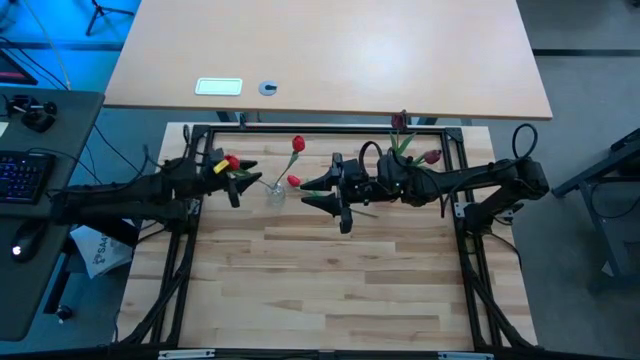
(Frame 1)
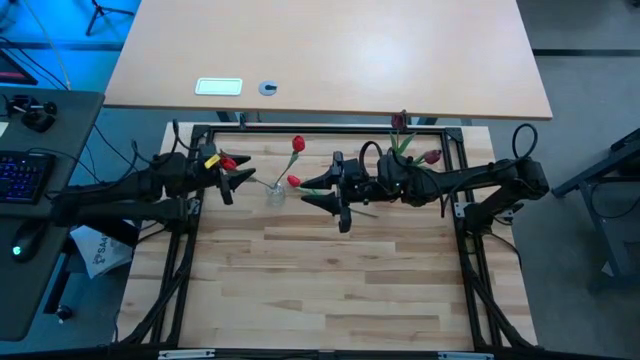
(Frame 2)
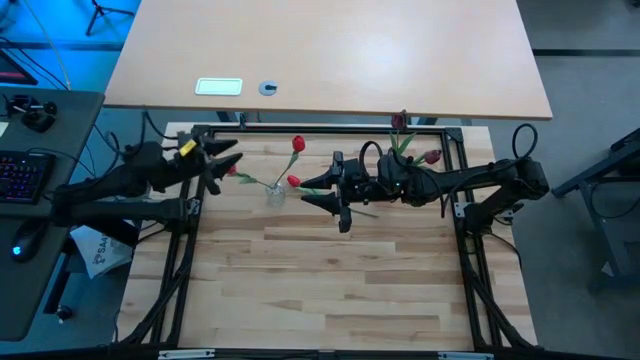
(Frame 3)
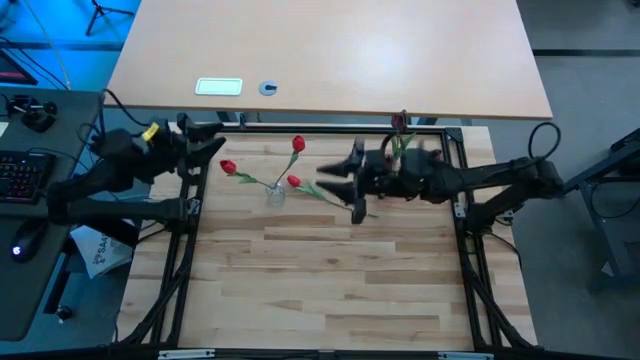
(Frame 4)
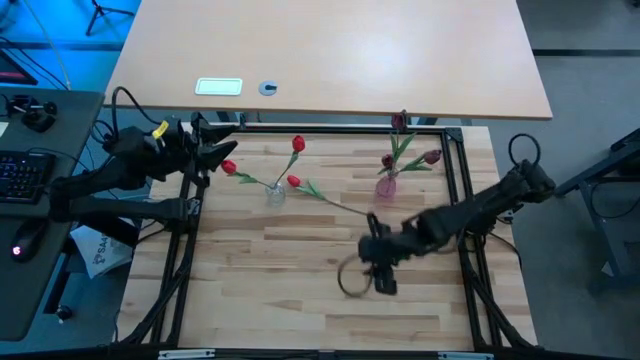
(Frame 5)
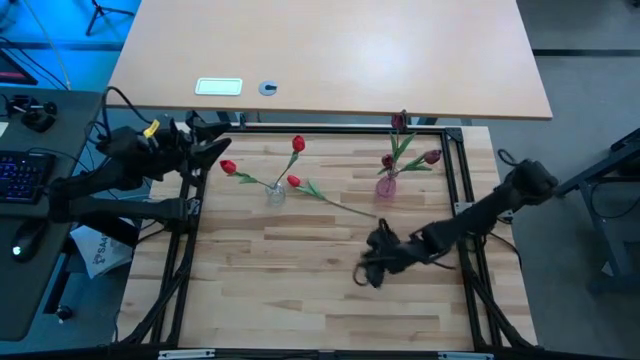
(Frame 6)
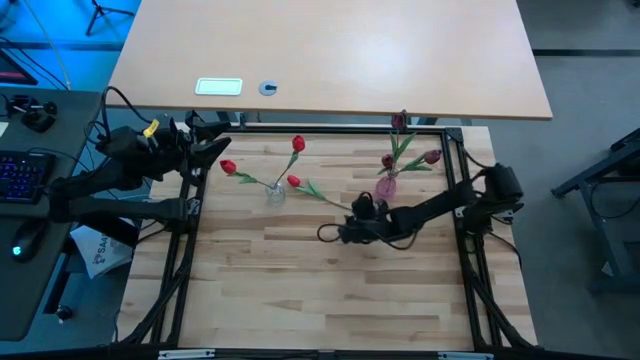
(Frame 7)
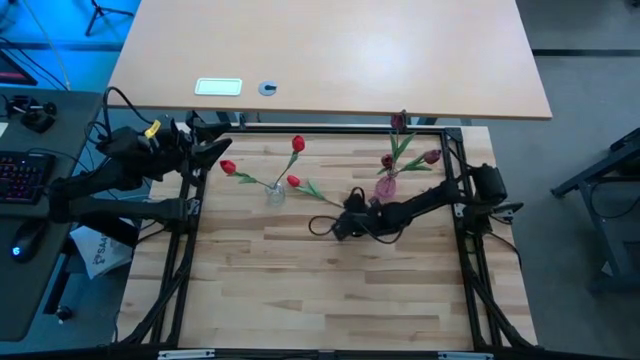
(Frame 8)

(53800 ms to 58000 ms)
Task: Sort flowers into vase by color
Put the red tulip into the transparent vase

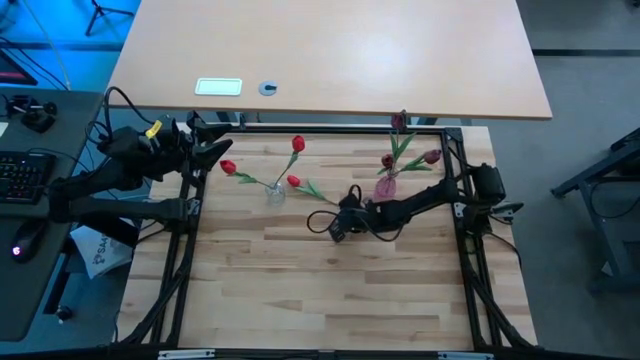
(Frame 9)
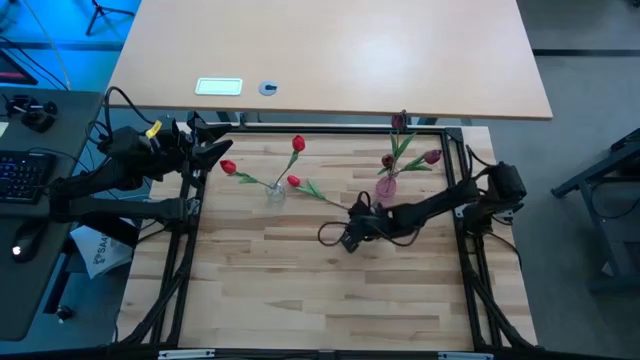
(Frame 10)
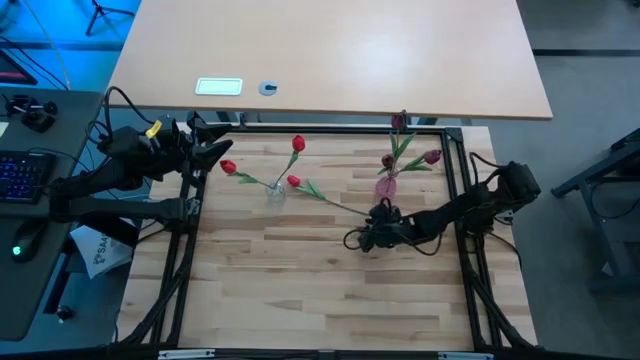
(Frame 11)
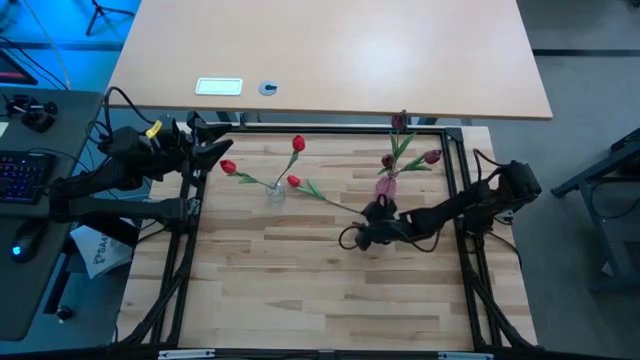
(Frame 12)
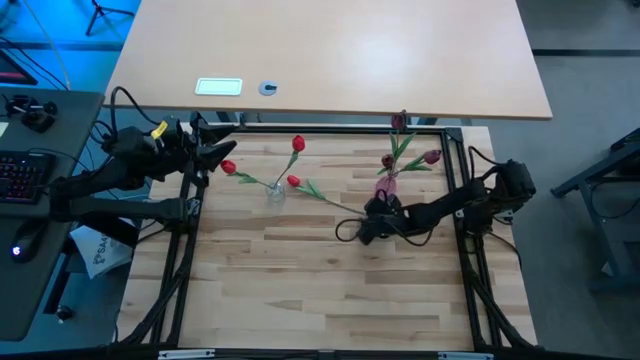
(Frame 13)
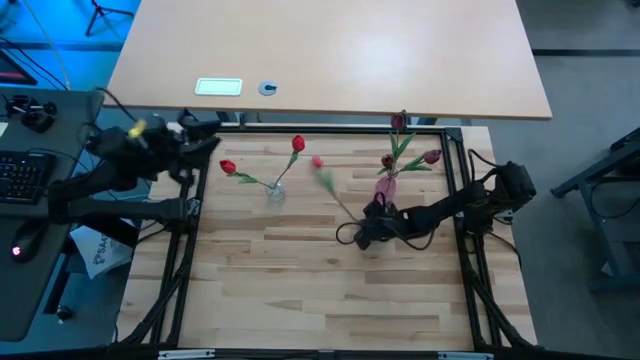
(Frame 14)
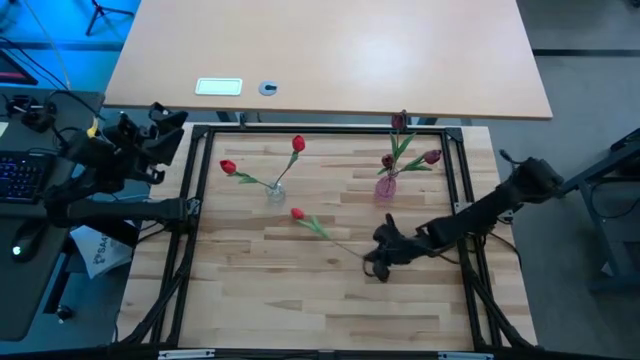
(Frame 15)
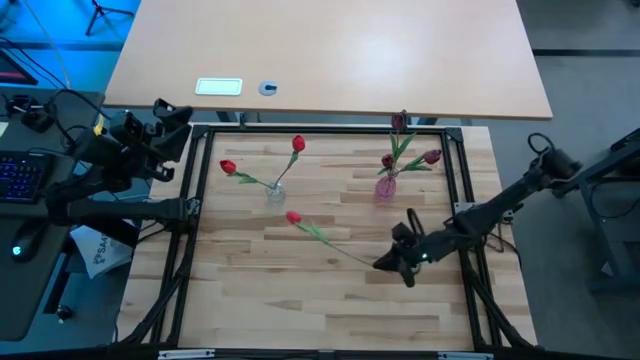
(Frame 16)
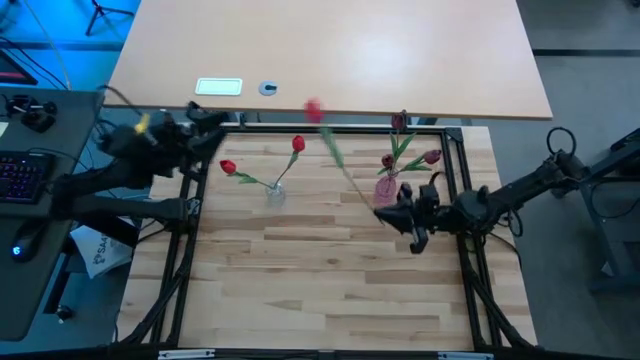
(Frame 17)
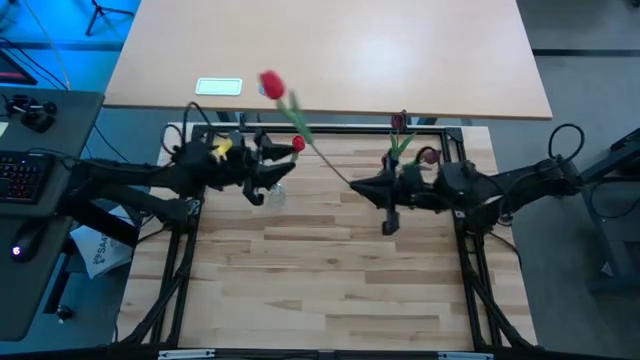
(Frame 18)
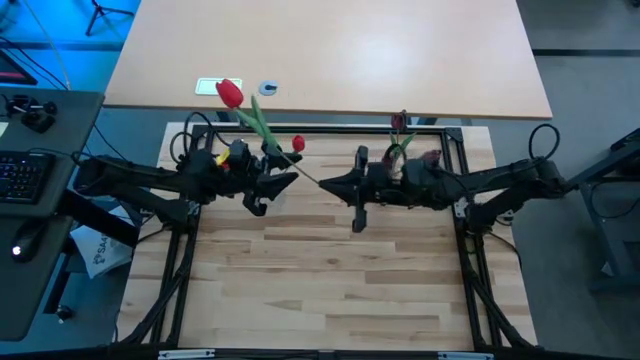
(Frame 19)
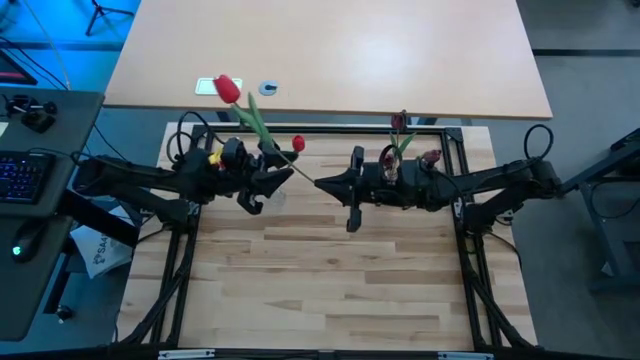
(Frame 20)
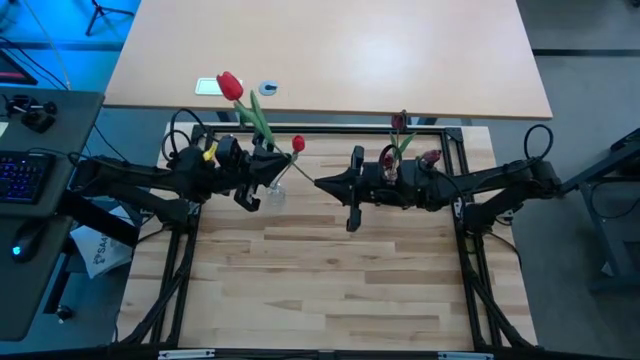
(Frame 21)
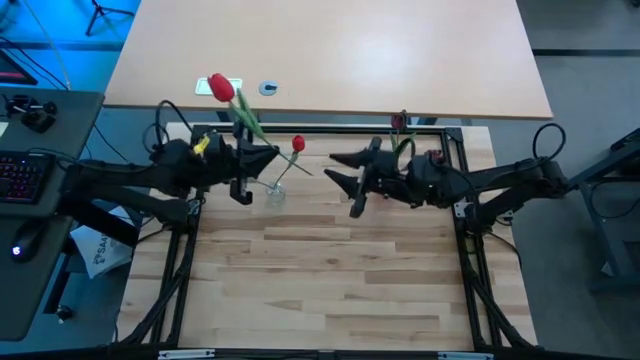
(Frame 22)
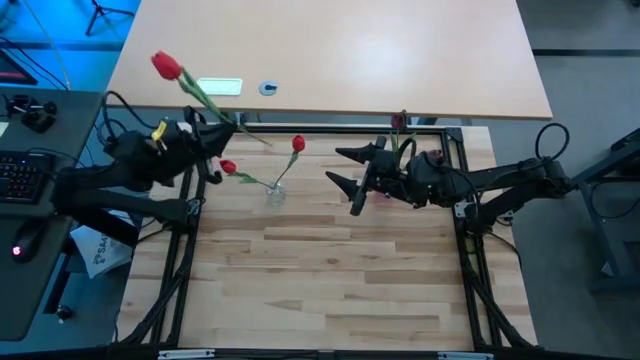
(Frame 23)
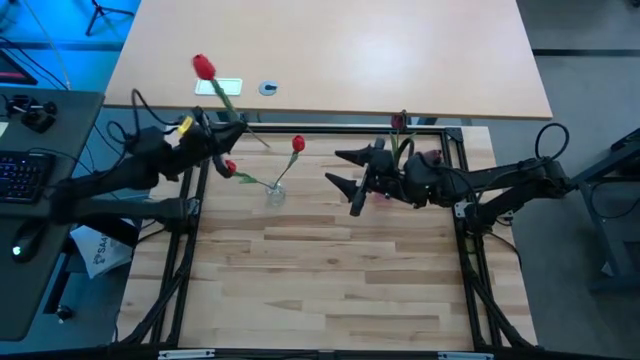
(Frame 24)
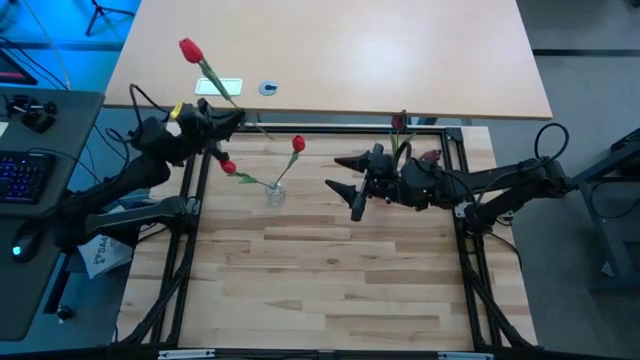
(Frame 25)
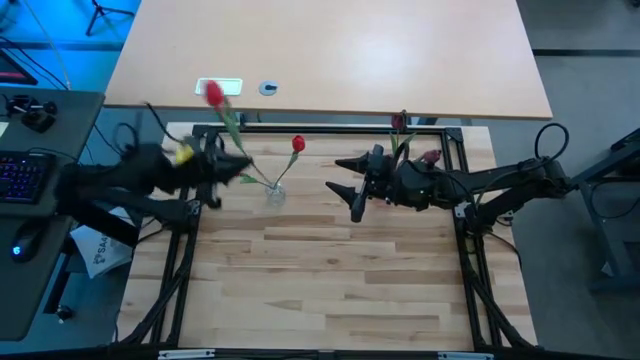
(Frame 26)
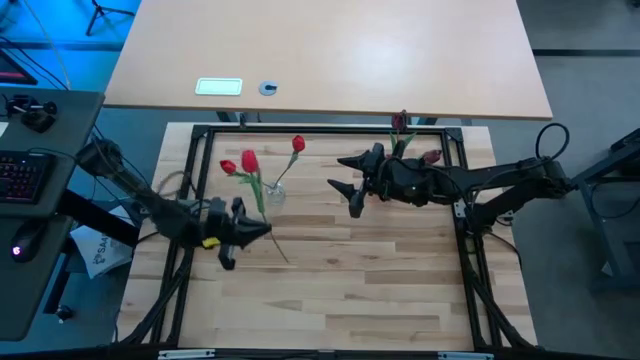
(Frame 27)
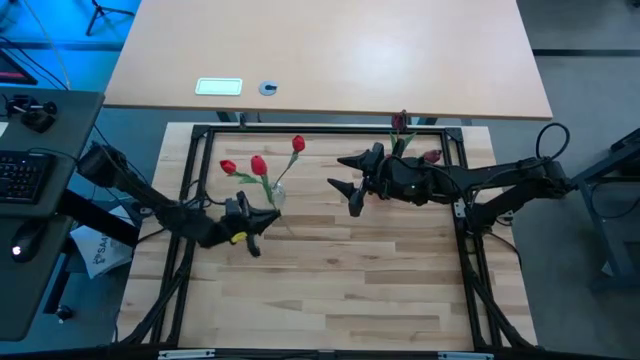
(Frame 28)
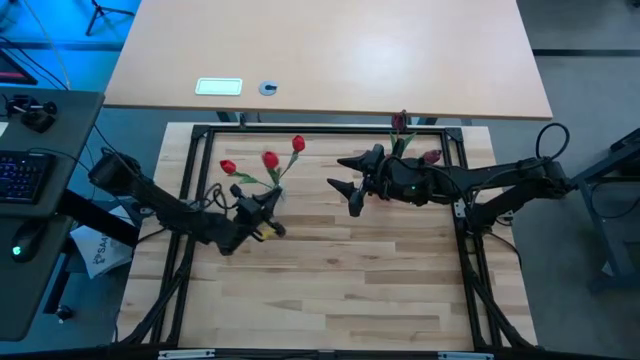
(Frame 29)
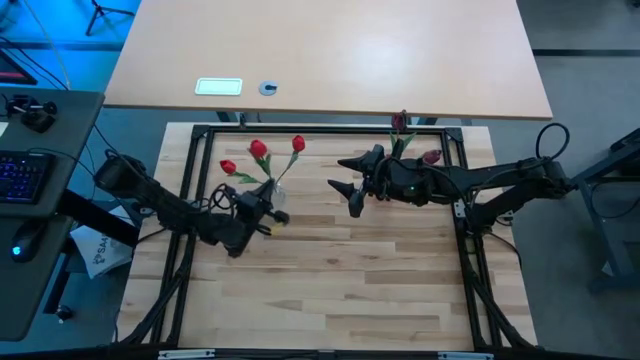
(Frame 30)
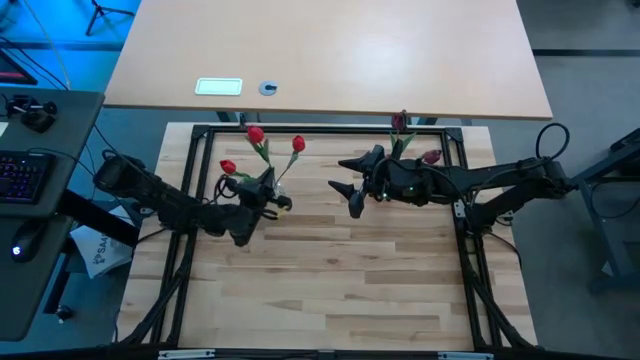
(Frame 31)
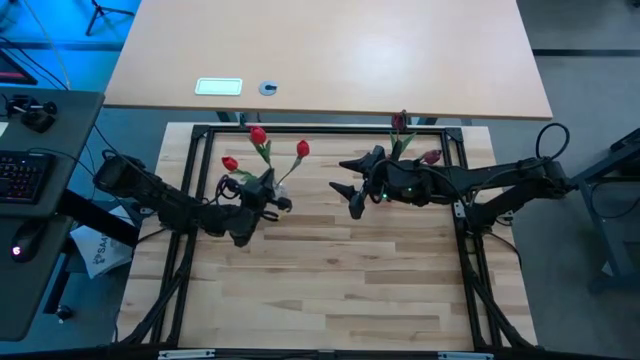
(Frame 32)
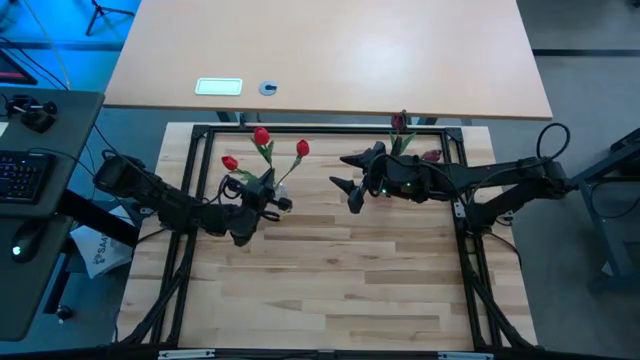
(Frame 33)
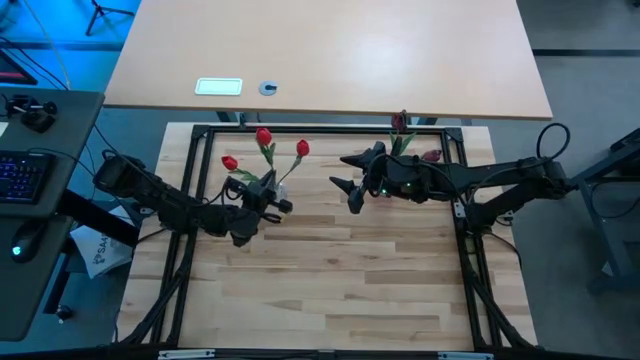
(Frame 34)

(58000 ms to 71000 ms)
Put the red tulip into the transparent vase

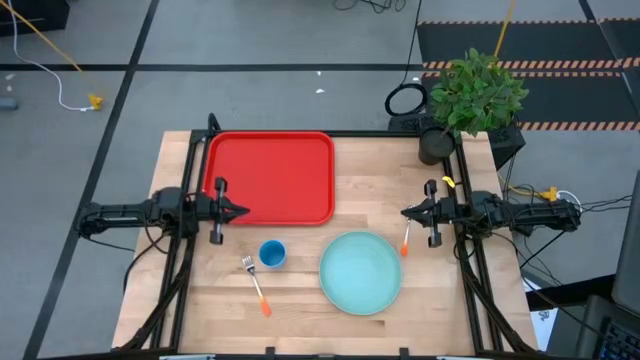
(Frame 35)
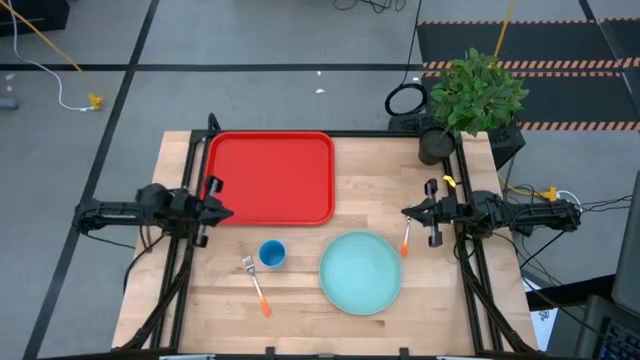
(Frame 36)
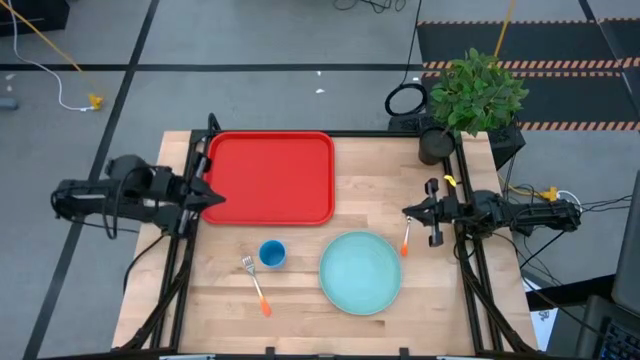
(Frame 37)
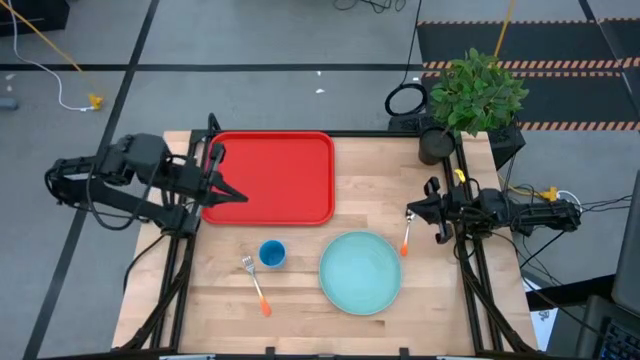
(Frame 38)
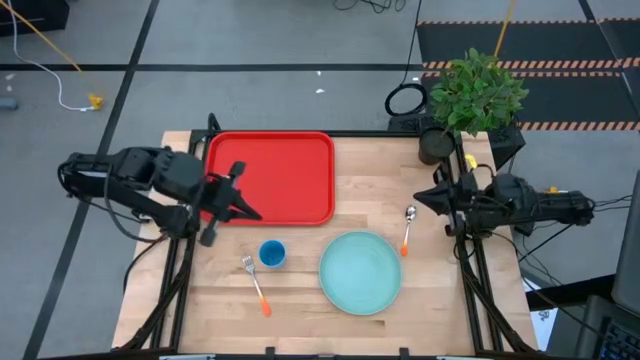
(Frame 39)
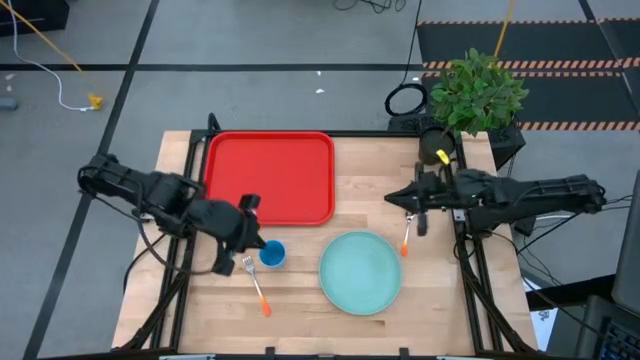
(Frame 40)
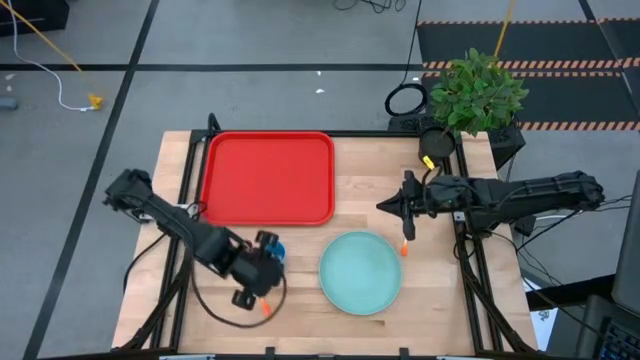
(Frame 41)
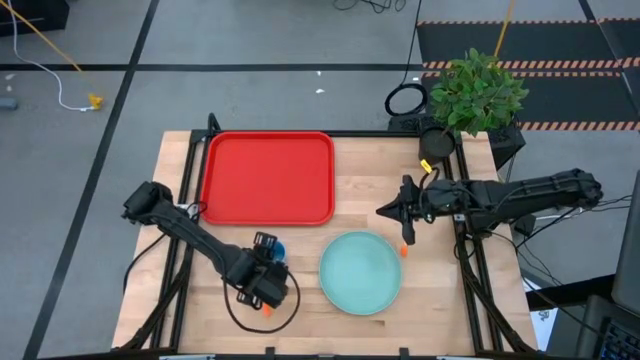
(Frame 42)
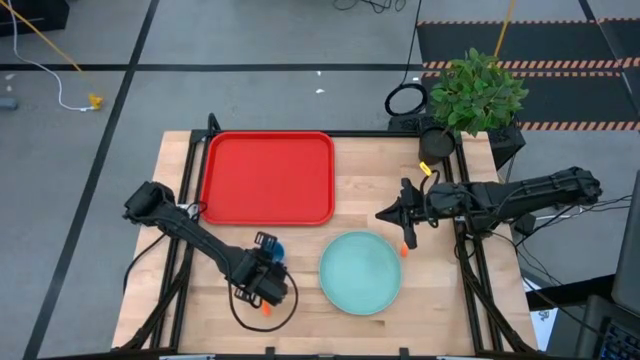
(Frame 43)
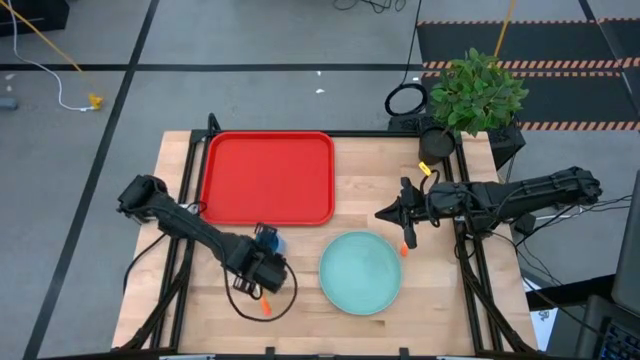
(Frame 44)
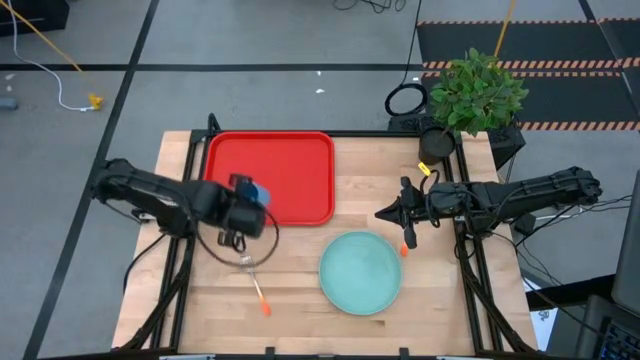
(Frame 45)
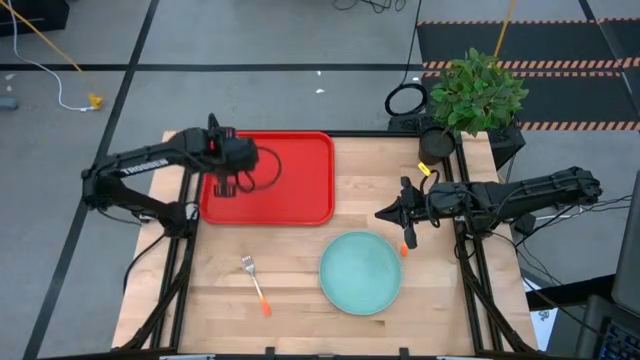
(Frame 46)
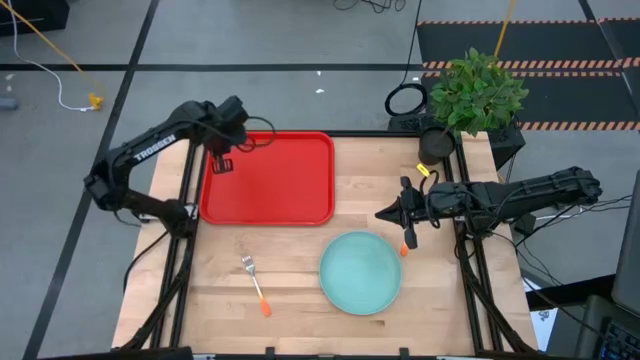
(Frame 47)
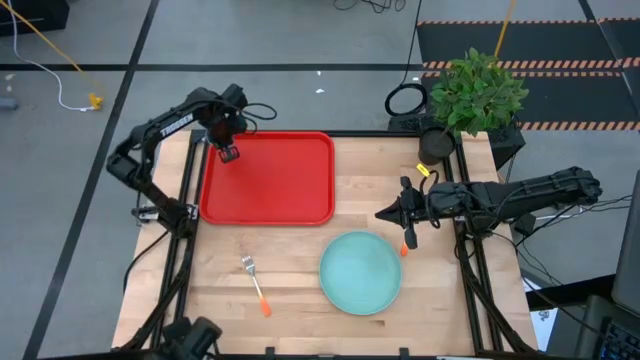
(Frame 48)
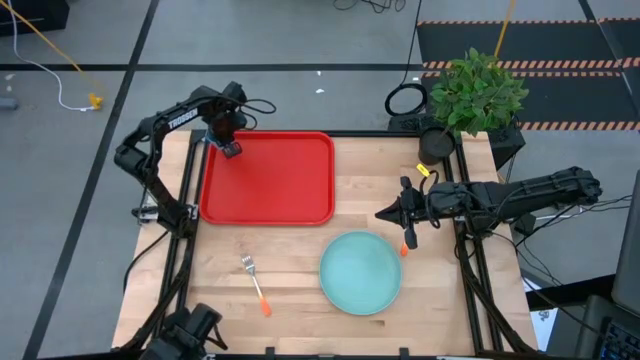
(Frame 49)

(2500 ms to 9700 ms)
Task: Pick and place plate/cup/fork/spoon on tray
Put the blue cup on the red serving tray
